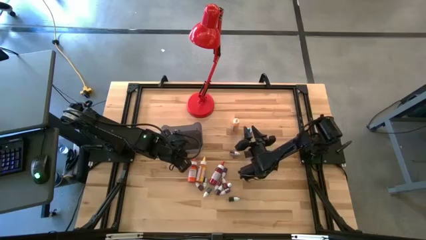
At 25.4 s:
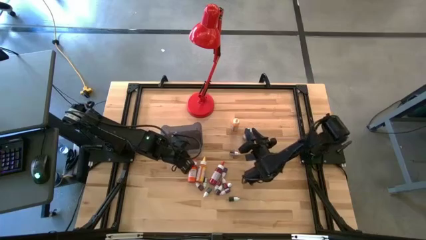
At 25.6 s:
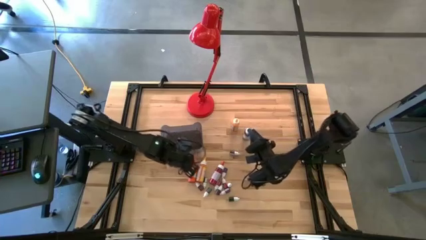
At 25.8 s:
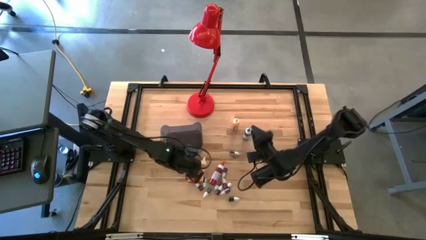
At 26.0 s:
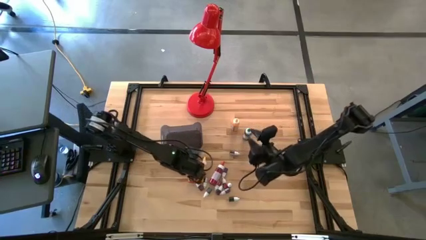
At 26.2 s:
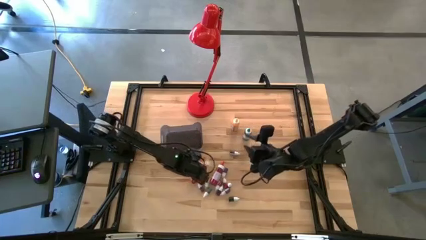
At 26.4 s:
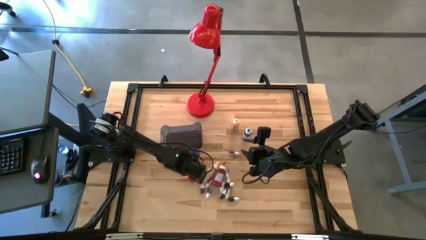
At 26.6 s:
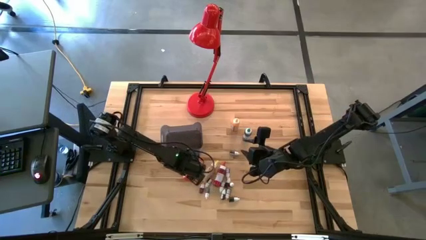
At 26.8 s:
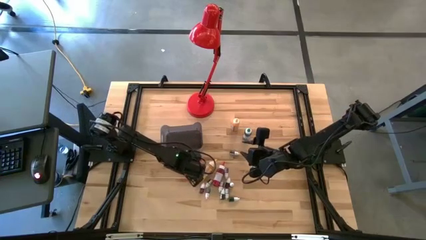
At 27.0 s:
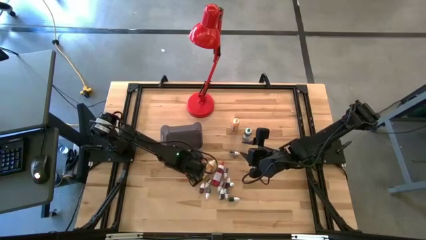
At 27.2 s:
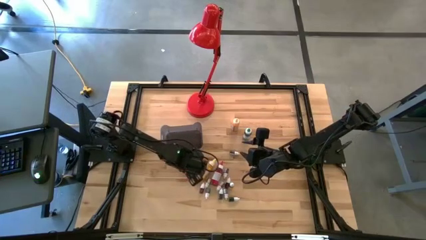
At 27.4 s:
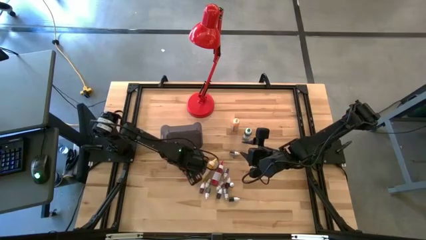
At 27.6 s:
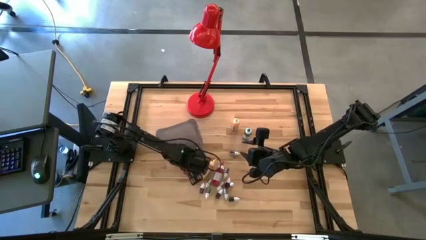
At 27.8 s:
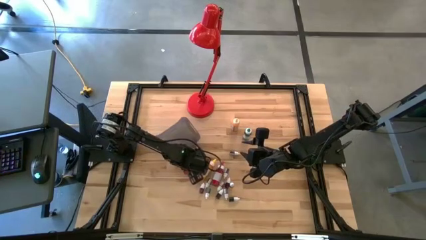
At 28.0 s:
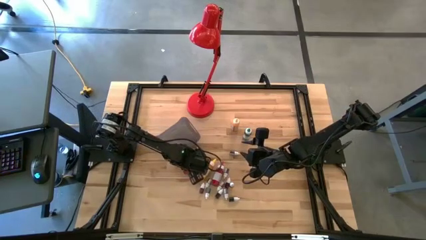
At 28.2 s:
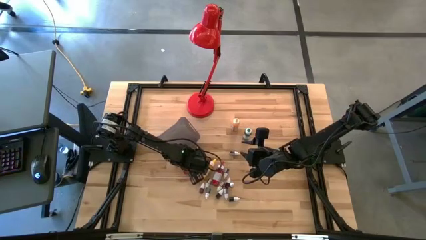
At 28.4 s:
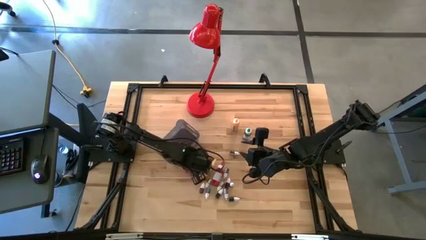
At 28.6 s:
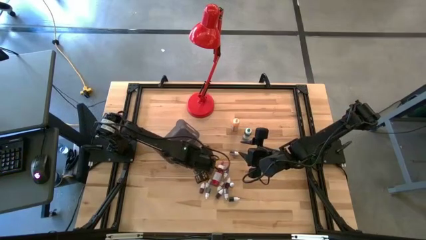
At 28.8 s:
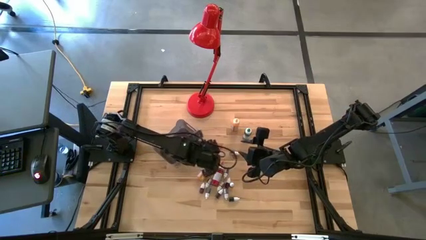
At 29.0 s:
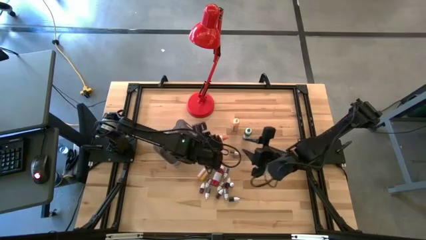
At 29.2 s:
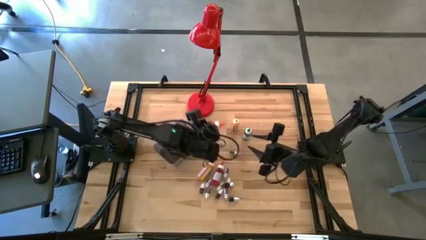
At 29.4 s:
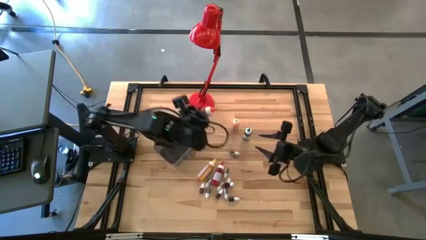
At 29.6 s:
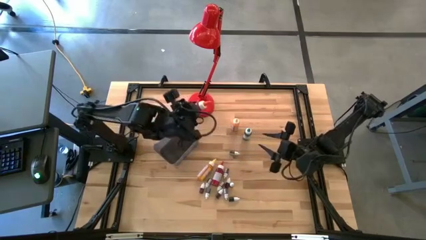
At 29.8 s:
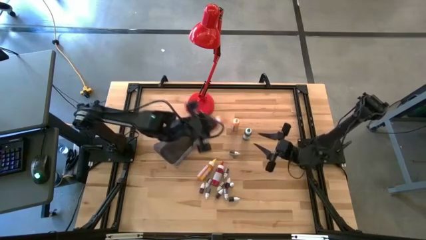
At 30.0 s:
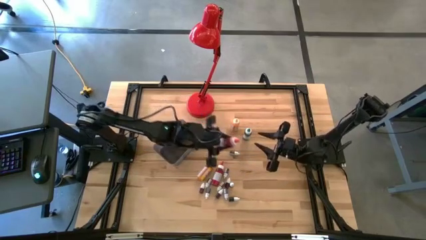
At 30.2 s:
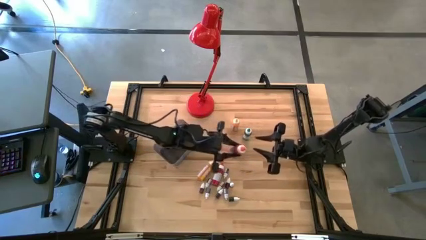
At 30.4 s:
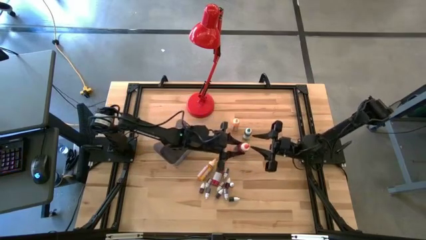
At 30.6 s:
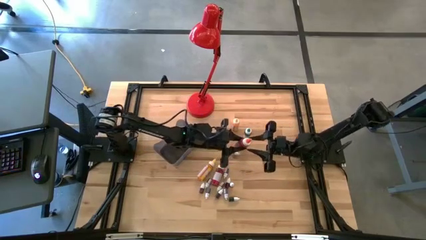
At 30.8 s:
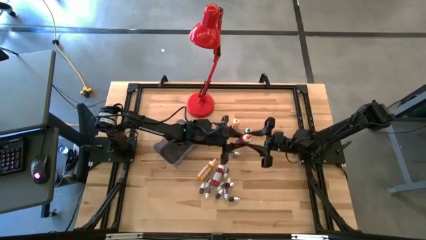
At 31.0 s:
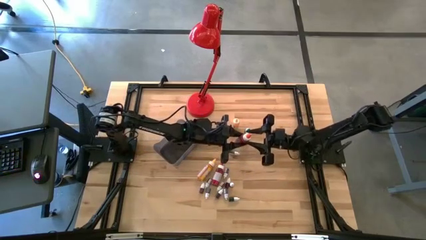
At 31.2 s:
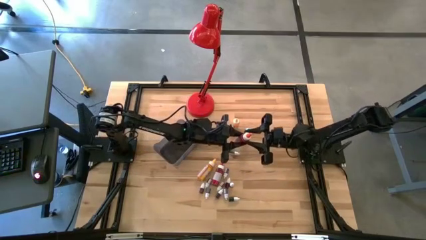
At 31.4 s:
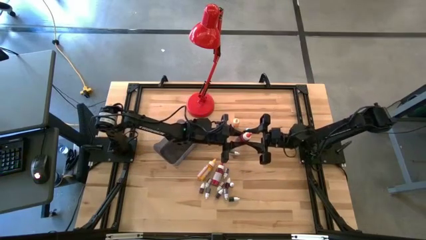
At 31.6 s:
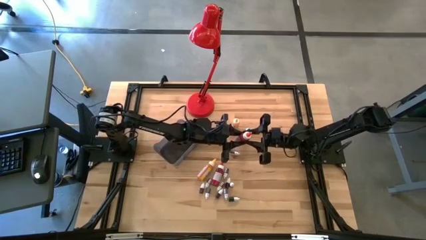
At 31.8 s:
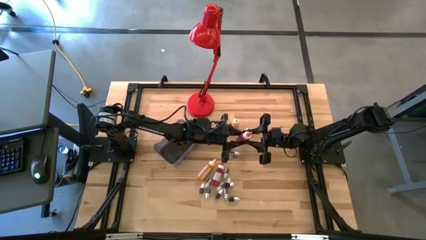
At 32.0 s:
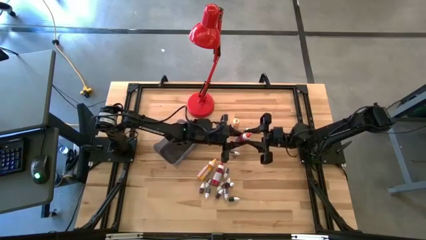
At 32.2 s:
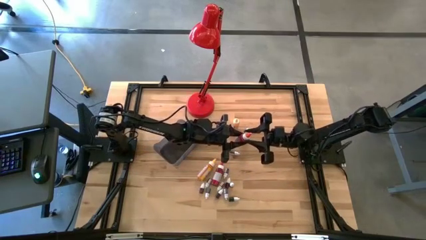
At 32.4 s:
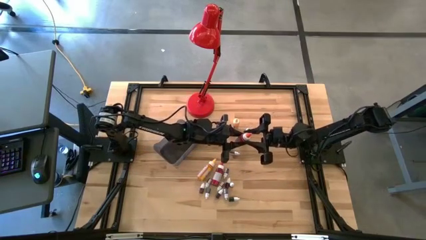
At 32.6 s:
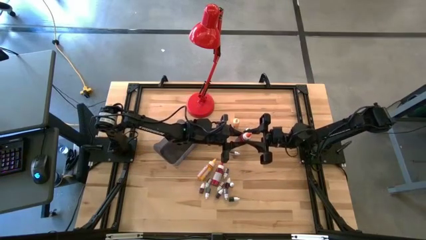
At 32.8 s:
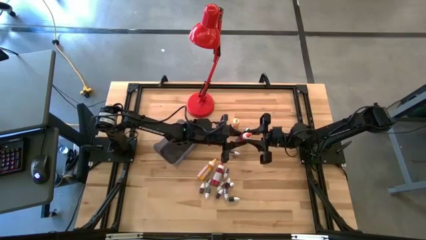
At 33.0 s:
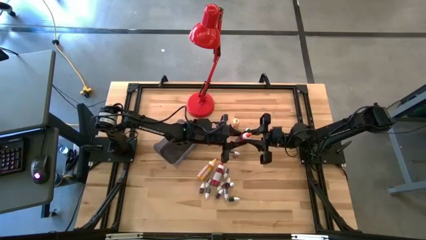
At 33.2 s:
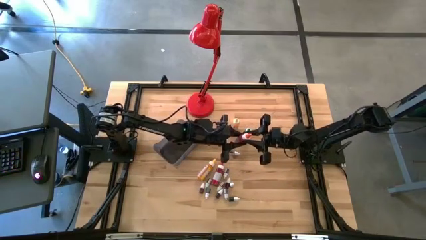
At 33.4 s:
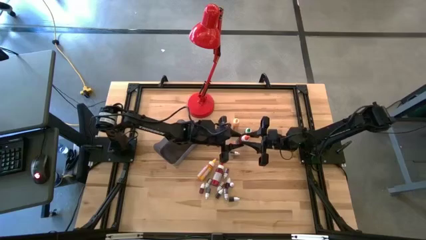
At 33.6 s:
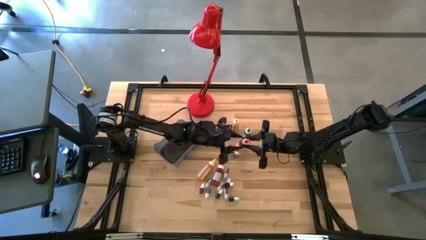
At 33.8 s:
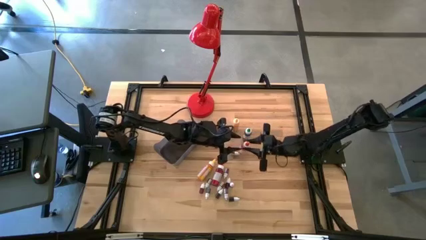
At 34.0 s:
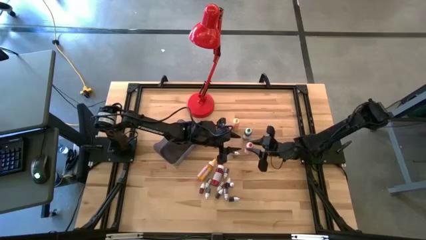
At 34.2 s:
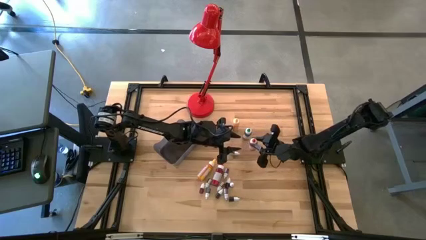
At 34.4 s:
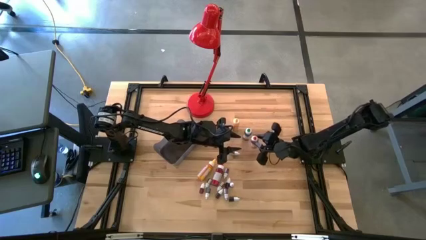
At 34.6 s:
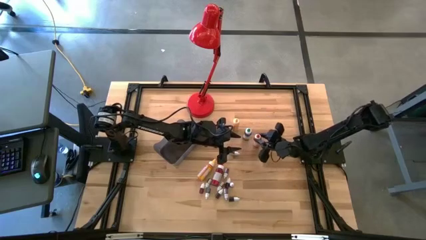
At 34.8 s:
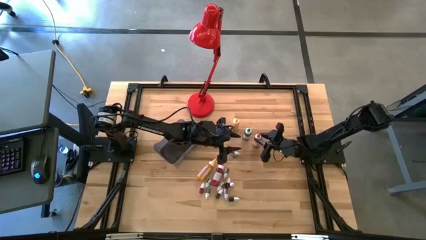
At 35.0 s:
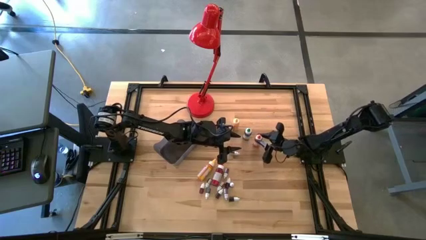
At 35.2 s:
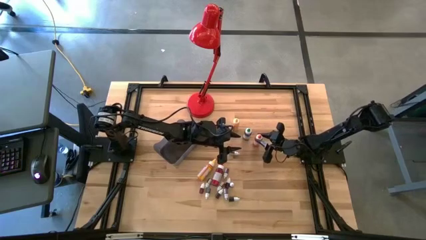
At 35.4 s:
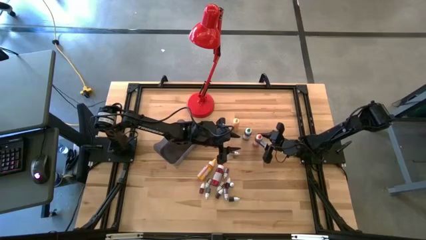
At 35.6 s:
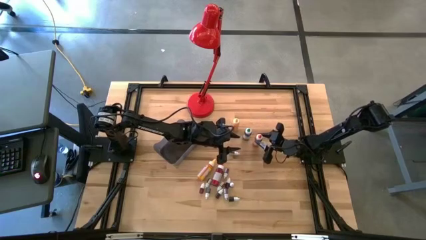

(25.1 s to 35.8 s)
Task: Pick & Place food coloring
Move the large orange food coloring bottle to the center of the table

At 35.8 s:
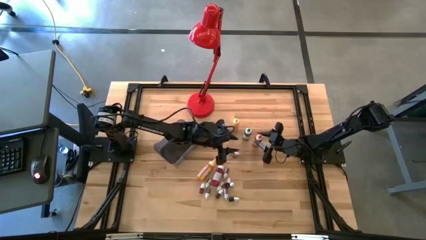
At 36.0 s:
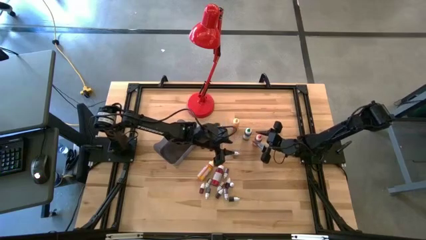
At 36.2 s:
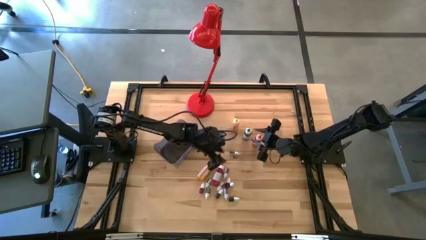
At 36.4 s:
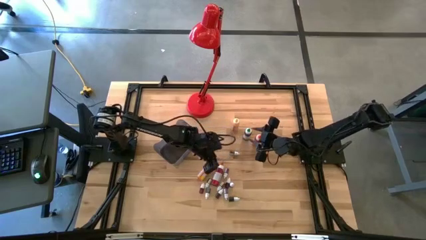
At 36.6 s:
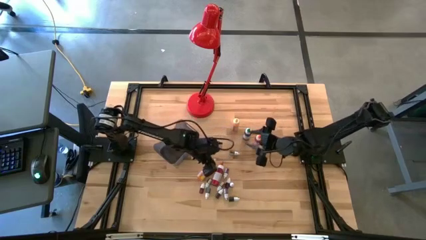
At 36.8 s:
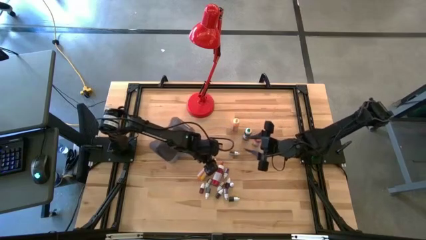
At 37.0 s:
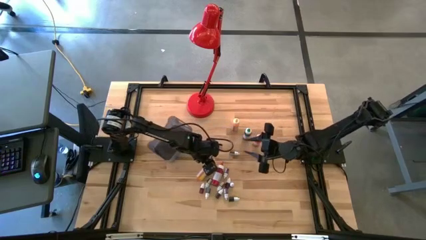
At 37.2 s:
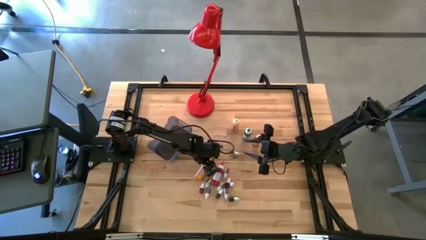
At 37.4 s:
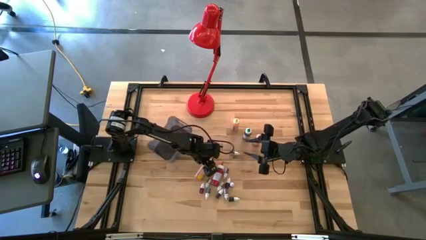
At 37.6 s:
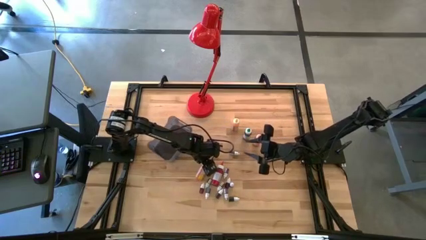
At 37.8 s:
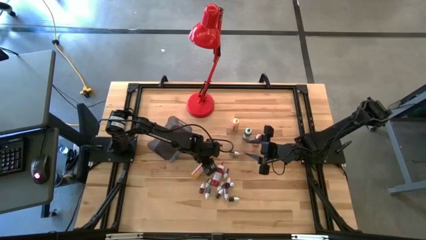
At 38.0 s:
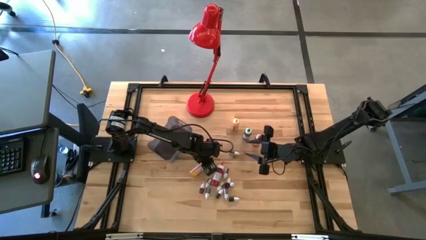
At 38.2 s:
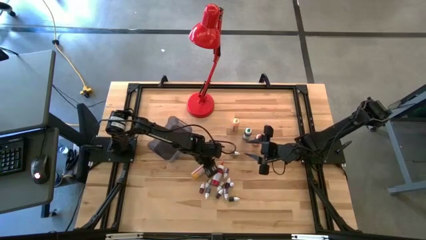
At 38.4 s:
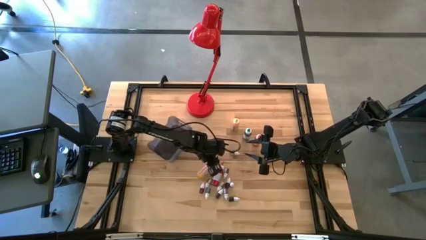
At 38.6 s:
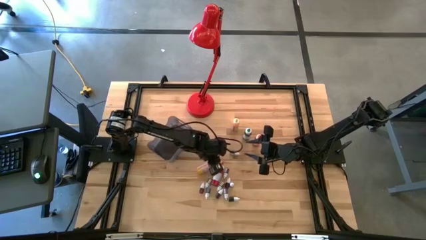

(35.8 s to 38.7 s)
Move the large yellow food coloring bottle to the center of the table

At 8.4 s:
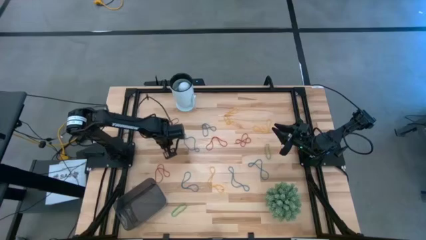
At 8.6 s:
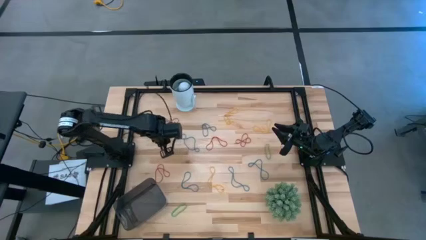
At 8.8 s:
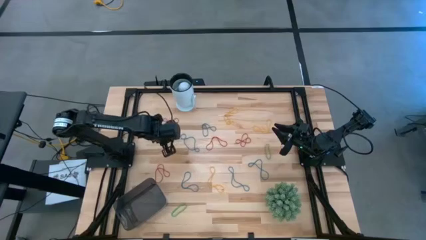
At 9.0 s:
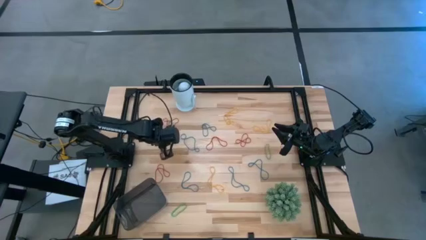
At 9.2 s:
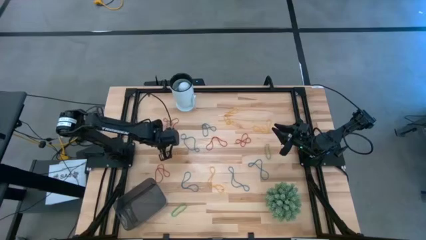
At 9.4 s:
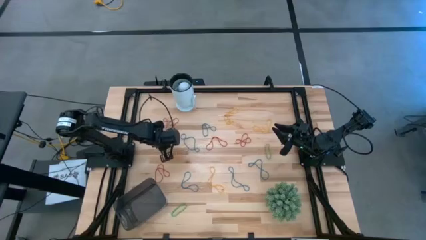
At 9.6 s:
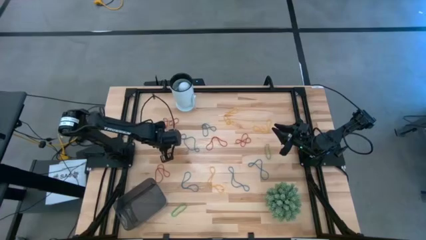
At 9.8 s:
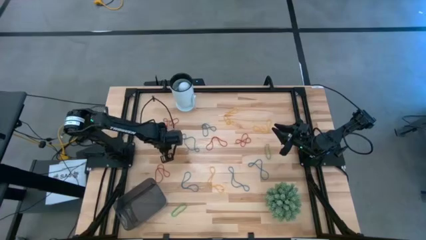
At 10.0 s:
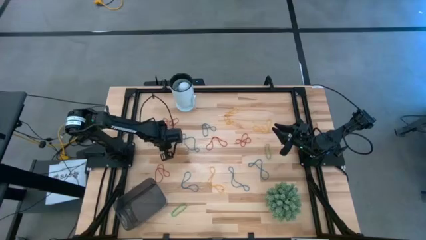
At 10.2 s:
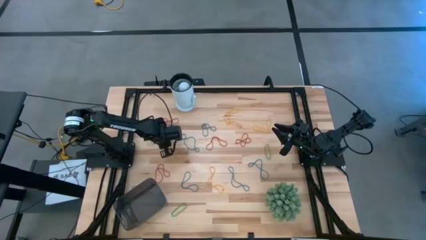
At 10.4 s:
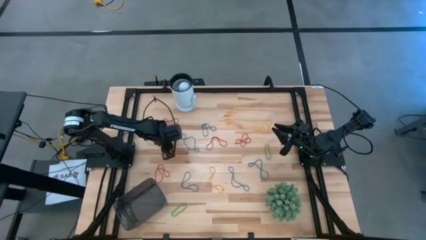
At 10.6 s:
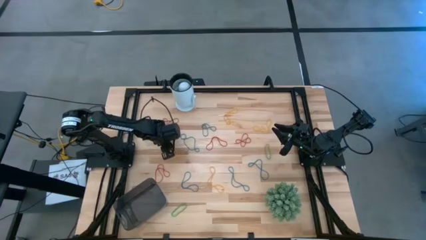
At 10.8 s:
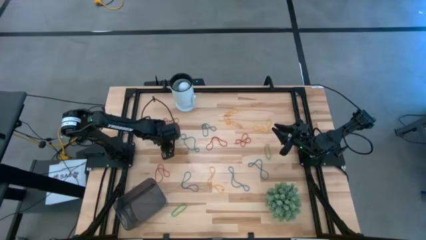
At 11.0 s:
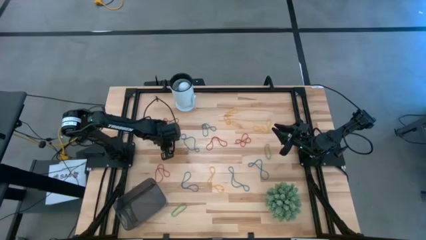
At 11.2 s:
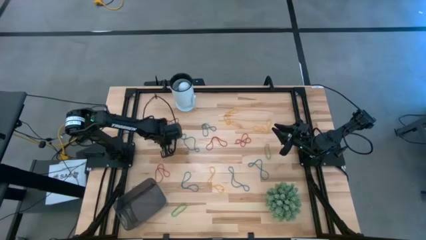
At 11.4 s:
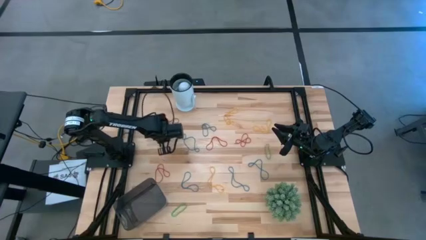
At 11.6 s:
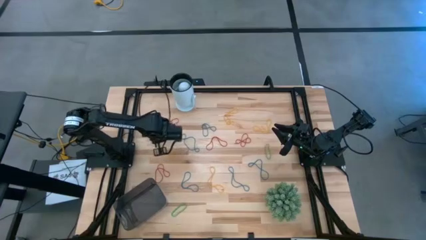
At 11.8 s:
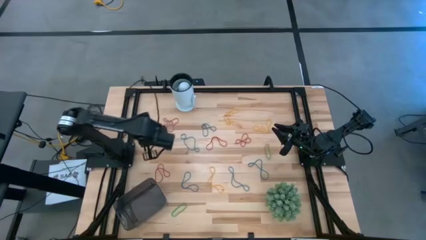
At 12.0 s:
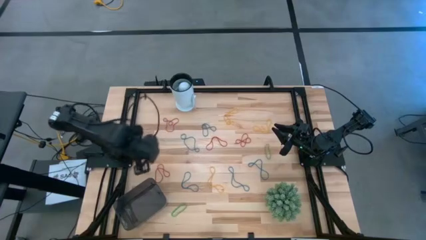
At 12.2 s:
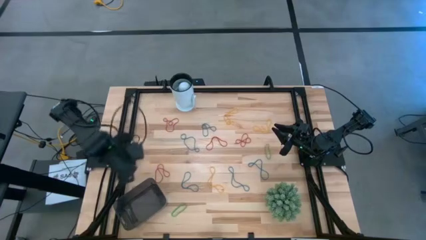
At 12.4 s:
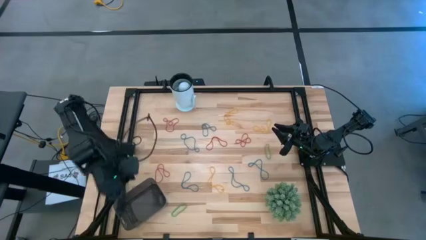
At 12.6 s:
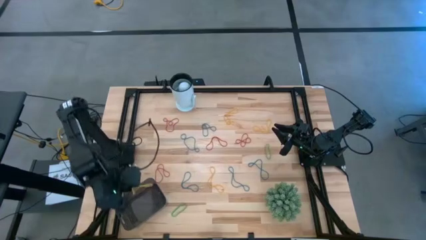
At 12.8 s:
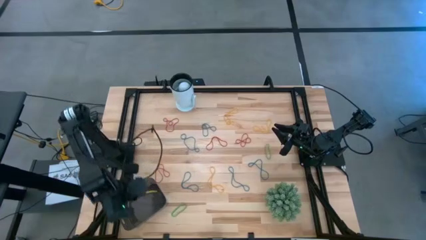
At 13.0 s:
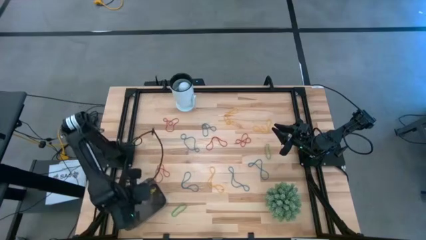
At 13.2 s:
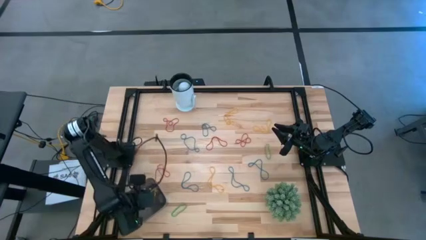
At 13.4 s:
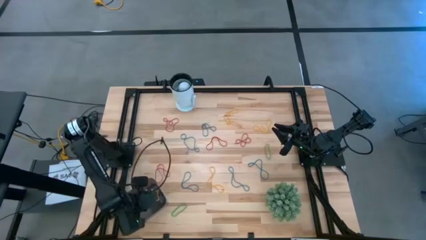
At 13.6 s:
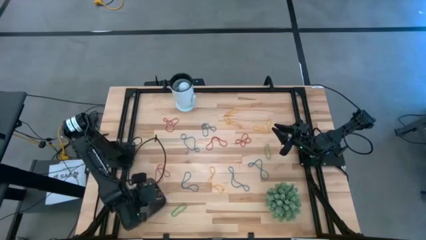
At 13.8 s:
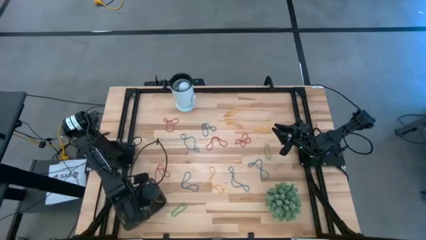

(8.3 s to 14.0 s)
Task: Pick and place items into bin
Put the yellow rubber band into the black bin
